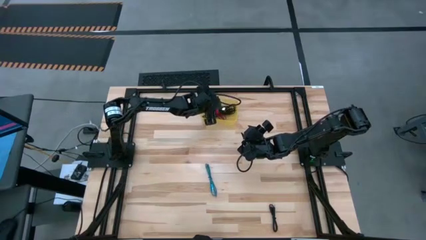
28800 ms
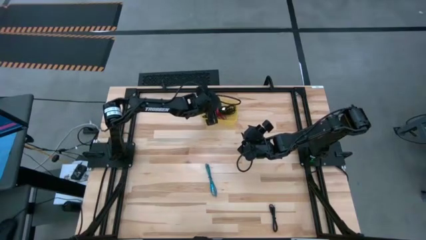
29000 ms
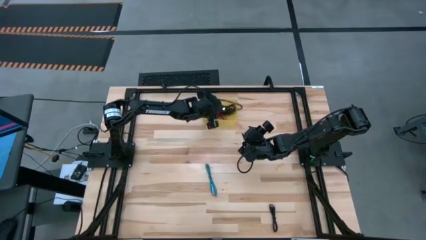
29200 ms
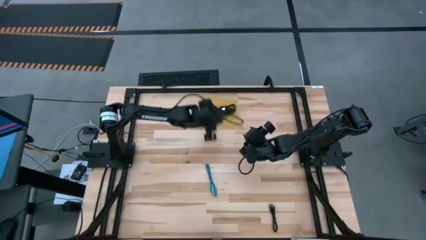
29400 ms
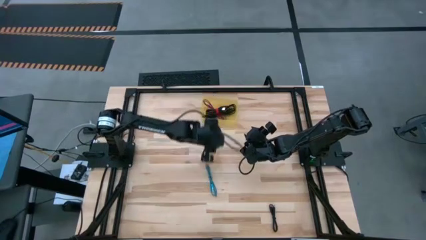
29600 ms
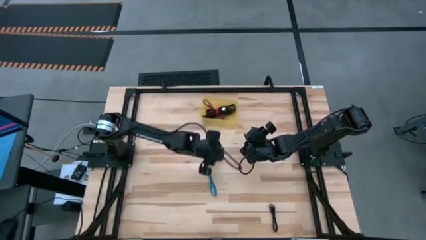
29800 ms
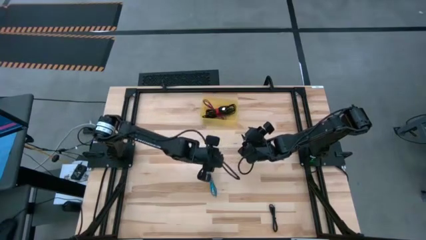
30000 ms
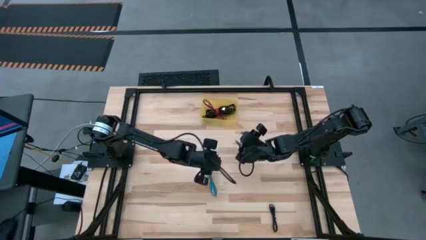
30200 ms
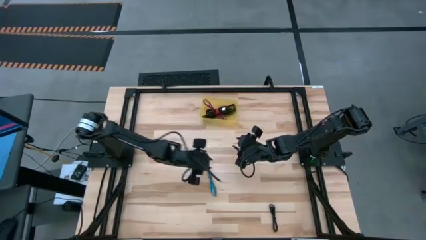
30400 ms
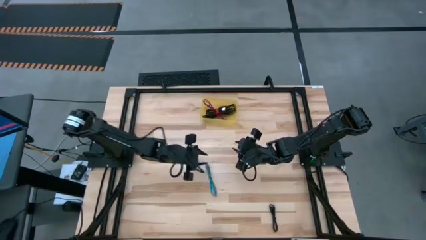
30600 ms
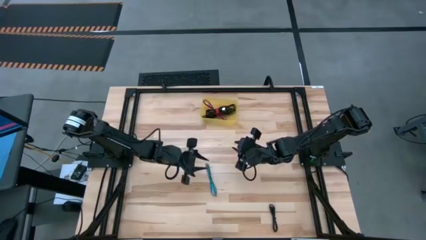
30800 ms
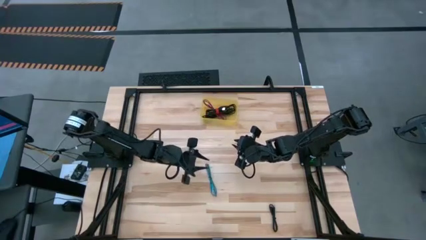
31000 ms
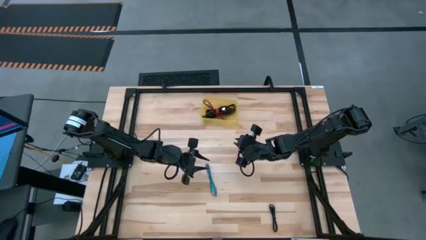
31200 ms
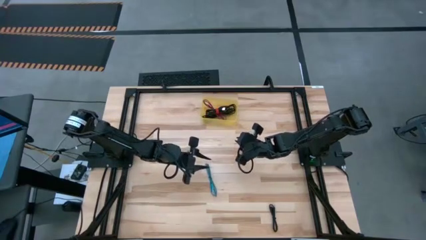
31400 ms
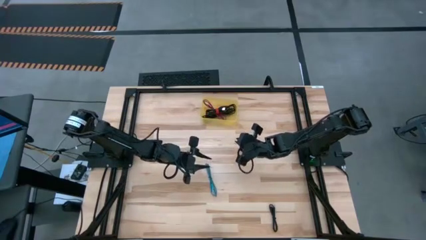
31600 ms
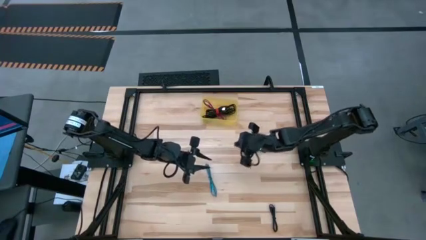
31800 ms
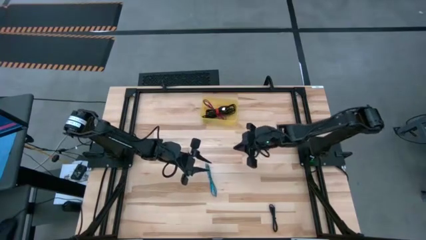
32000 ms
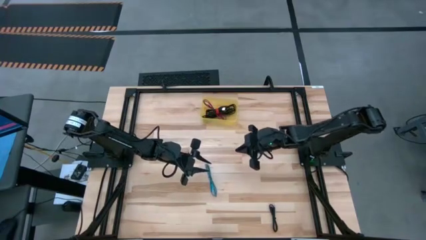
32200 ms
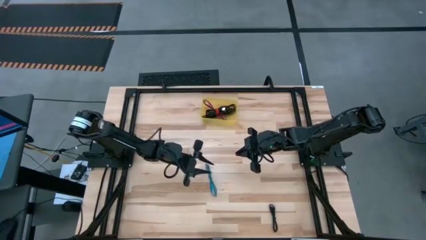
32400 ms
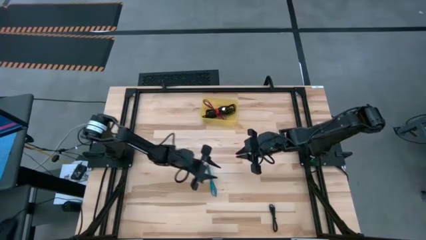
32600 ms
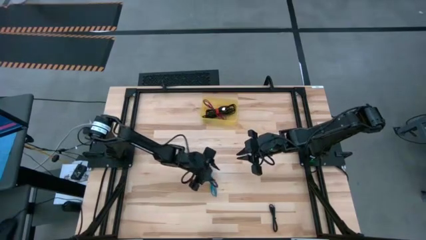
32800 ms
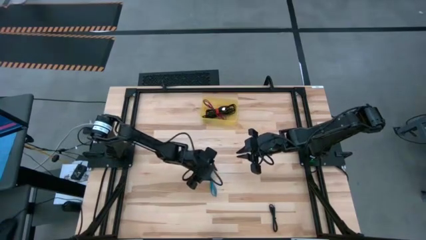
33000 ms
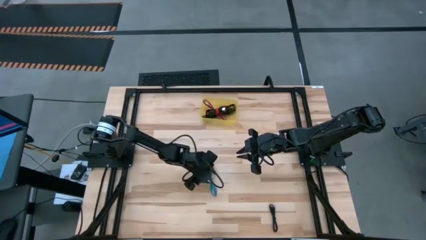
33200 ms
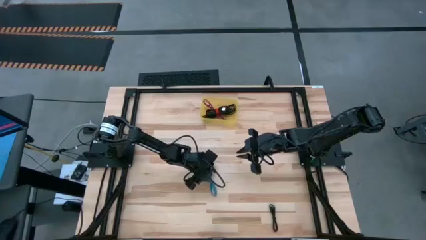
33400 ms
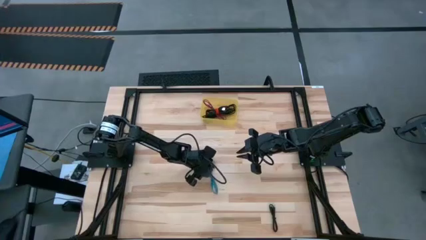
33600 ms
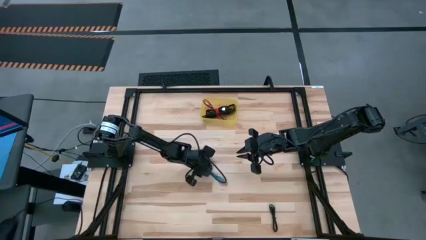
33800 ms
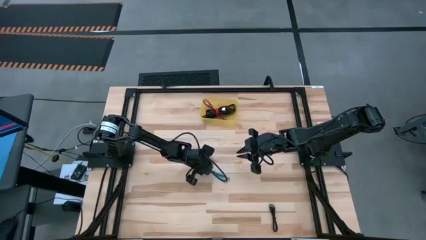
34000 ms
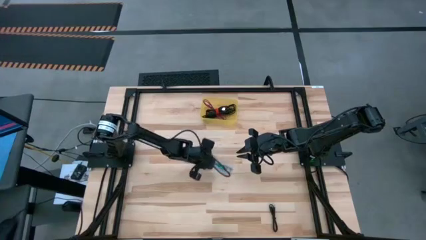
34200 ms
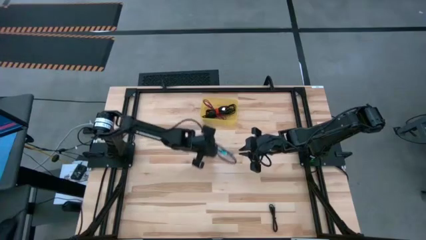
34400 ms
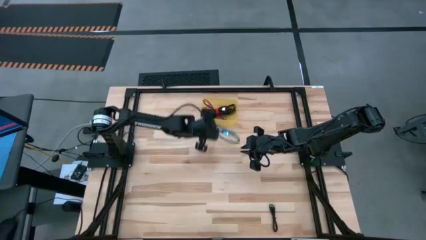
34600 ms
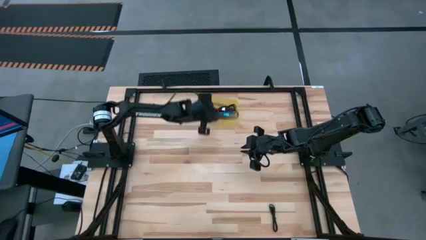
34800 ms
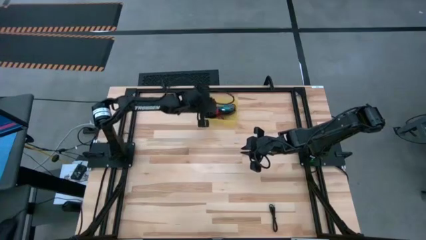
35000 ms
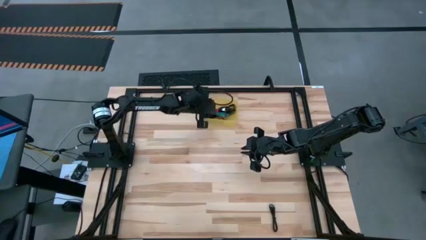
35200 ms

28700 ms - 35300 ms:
Task: Pick and place USB-C Cables
Put the blue charger cable into the yellow container

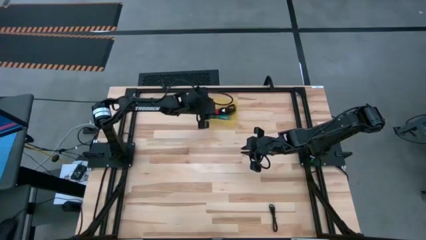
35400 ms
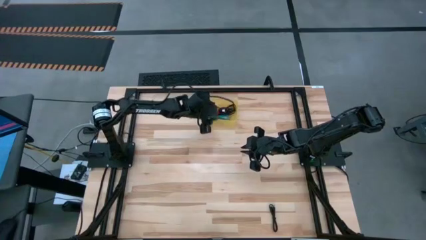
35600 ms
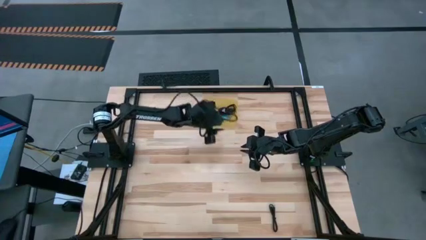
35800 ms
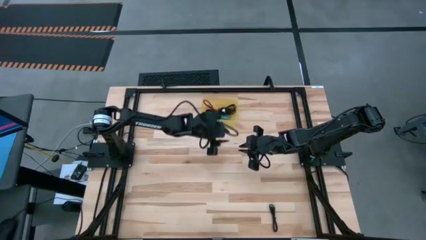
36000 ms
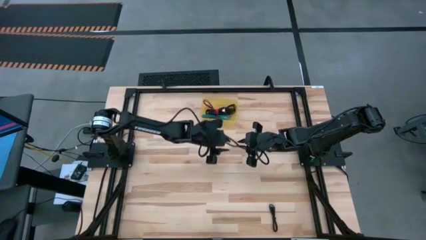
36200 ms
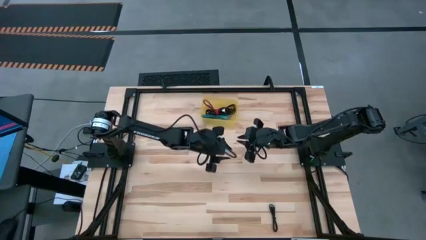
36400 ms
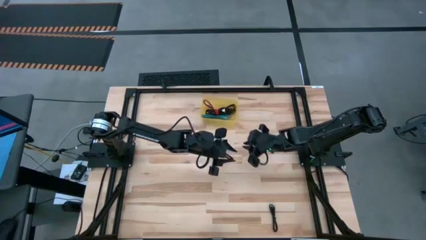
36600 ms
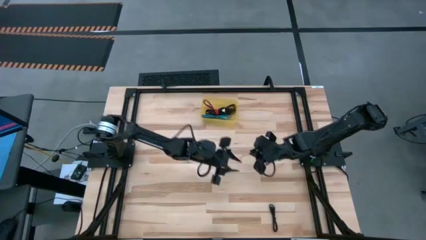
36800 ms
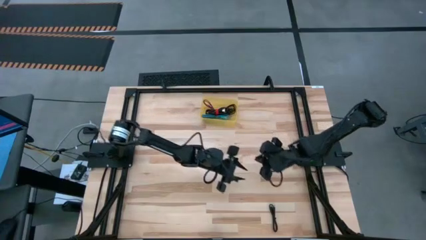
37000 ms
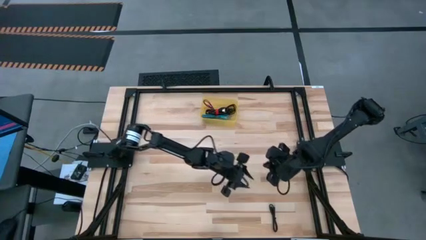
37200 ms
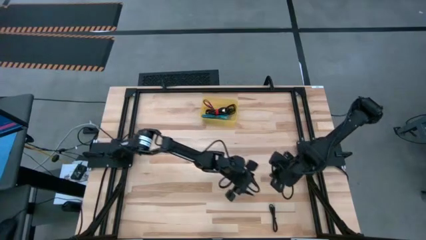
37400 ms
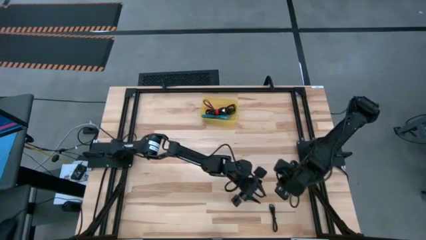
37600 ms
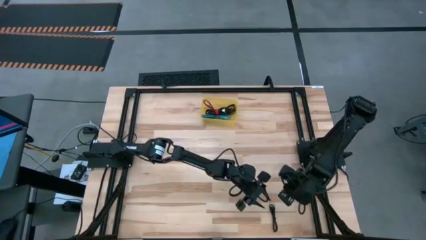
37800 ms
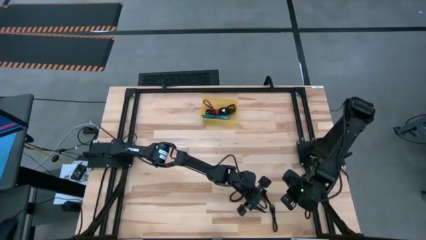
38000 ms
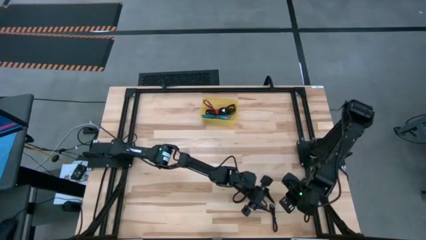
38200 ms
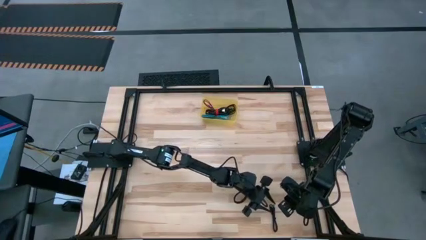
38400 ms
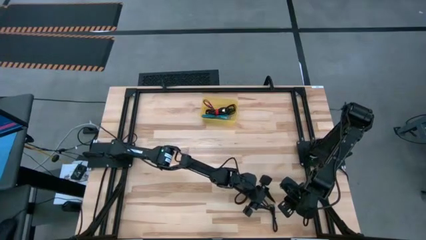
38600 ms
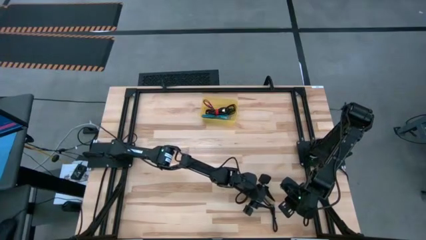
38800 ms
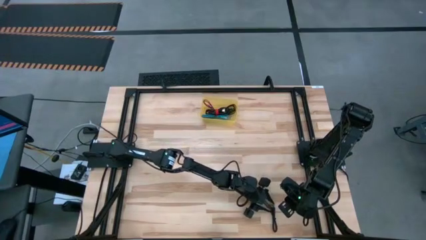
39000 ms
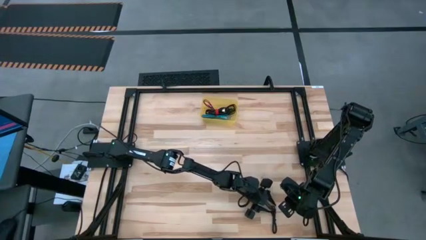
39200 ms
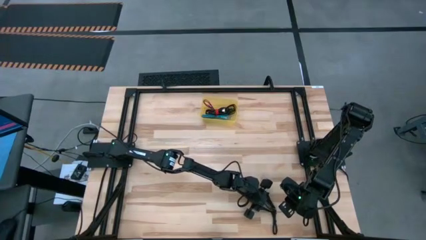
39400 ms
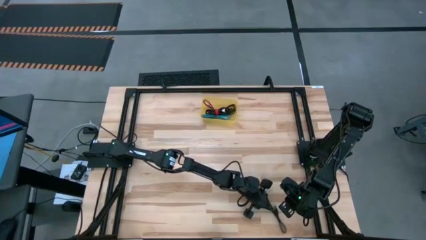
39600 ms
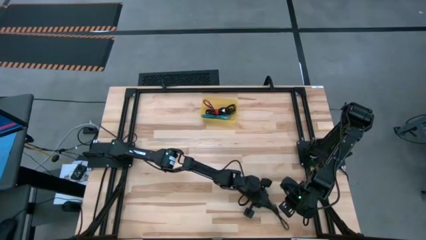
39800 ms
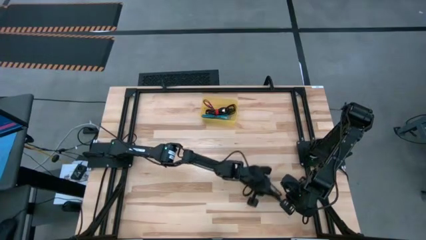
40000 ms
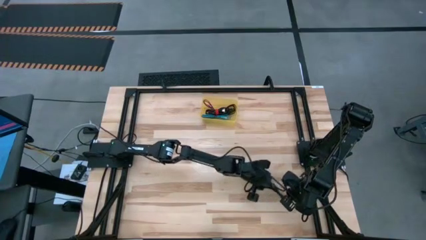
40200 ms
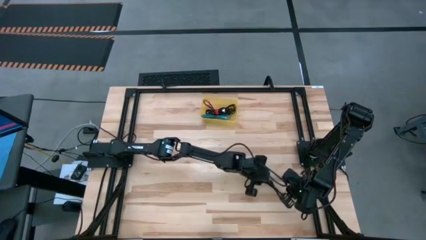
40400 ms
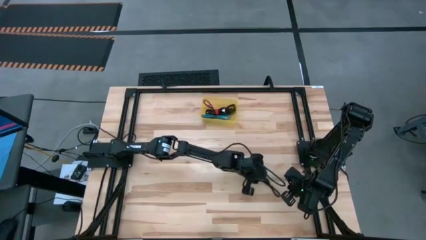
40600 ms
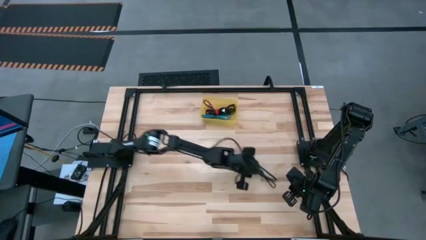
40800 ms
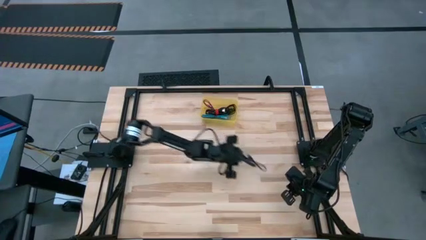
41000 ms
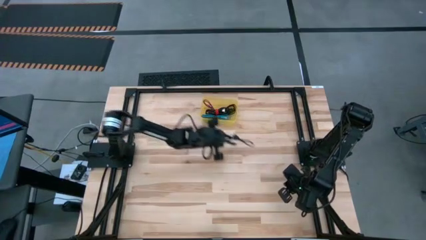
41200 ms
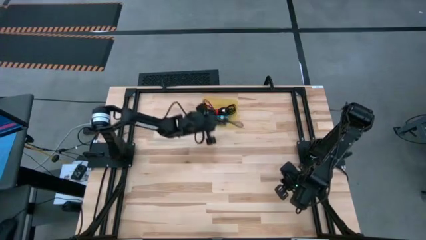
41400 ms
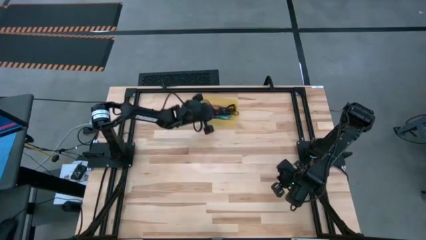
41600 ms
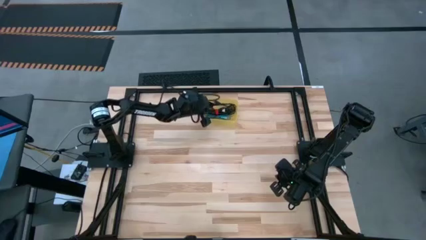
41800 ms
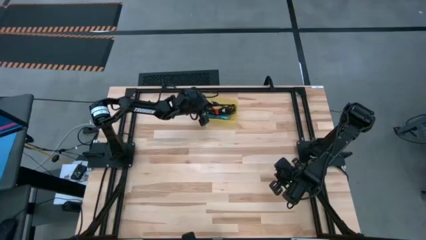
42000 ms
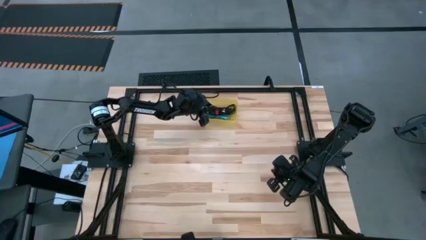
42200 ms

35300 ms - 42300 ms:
Put the black charger cable into the yellow container

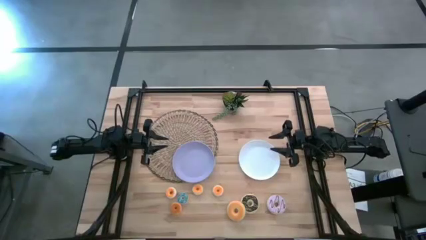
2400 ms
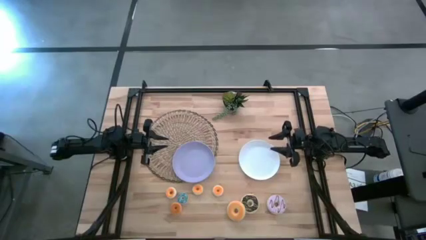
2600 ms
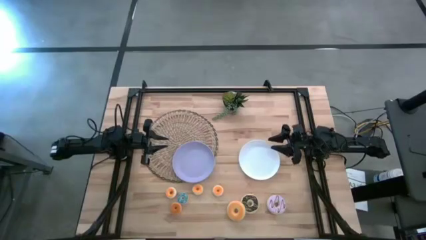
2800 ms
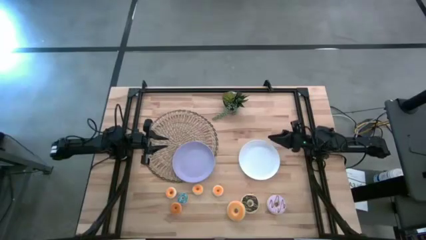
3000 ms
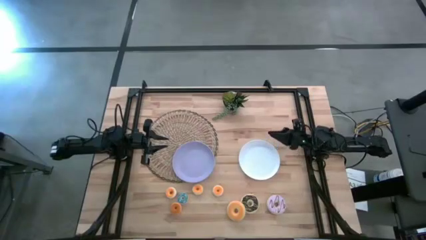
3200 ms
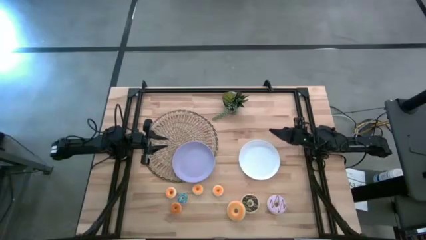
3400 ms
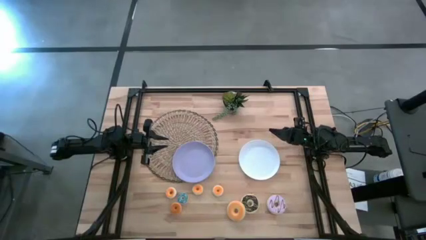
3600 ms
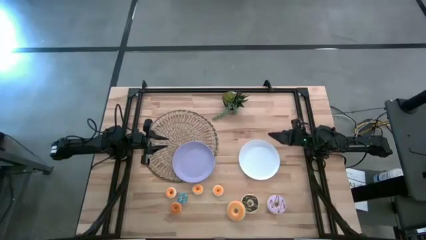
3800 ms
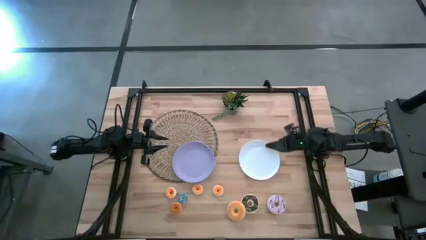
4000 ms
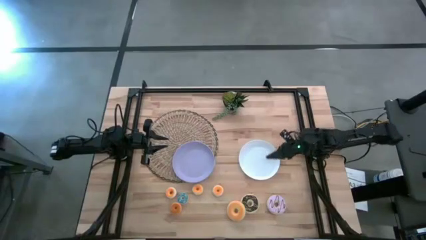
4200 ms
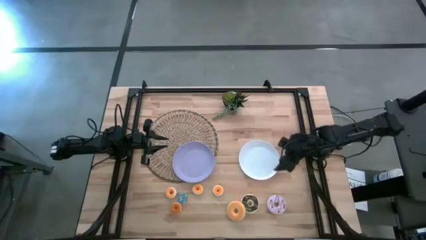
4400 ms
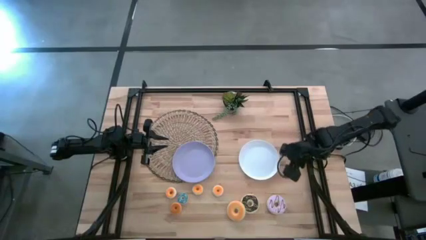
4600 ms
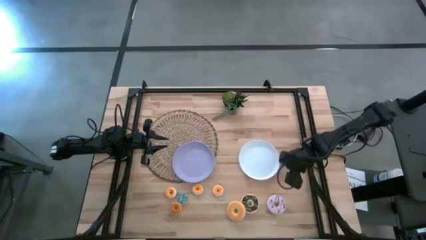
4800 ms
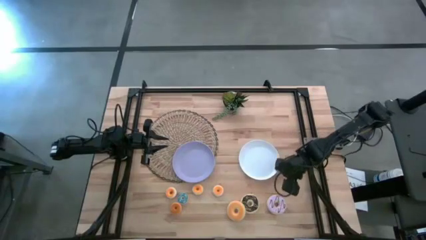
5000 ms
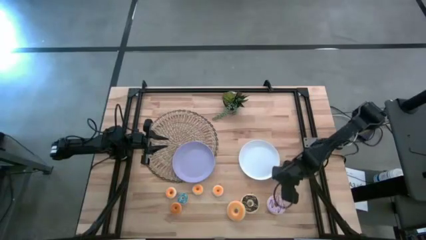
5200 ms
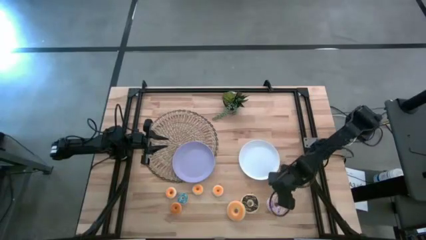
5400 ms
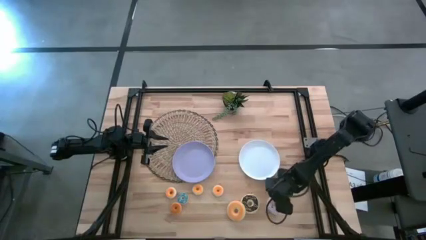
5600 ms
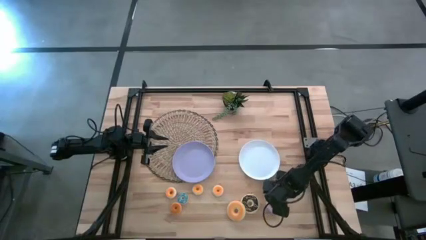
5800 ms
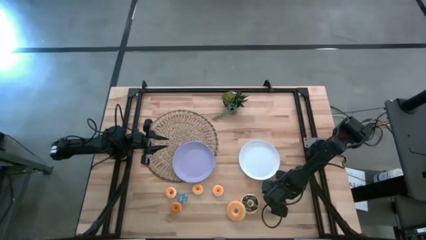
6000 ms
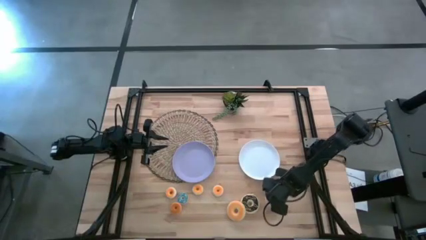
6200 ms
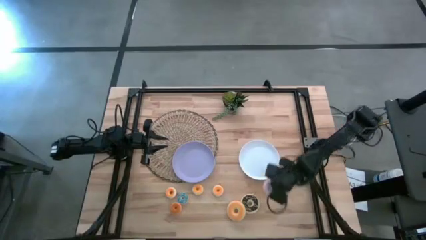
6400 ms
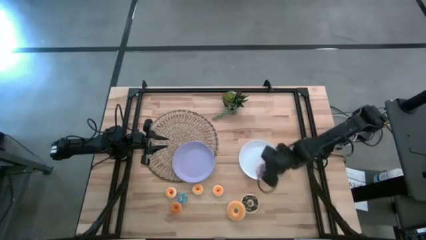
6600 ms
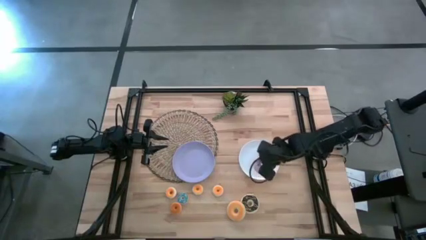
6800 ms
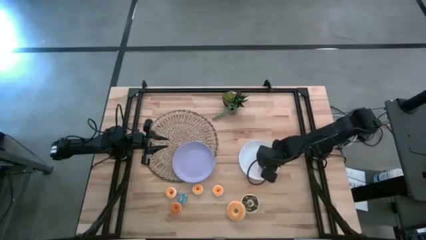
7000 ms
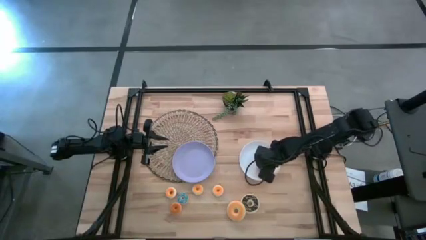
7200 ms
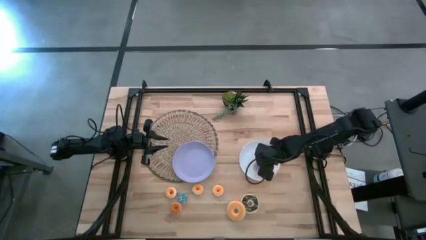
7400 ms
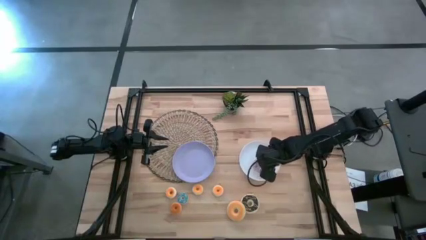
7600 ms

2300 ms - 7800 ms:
Task: Pick & Place donuts
Put the large purple donut on the white plate
